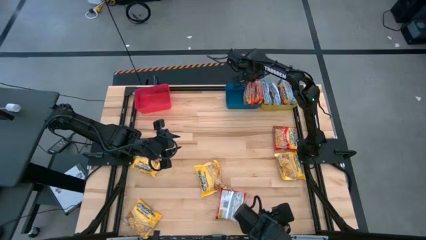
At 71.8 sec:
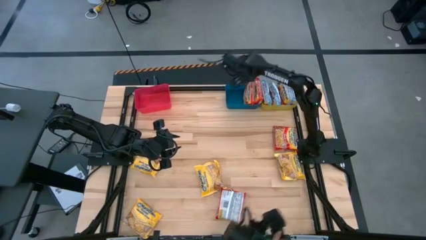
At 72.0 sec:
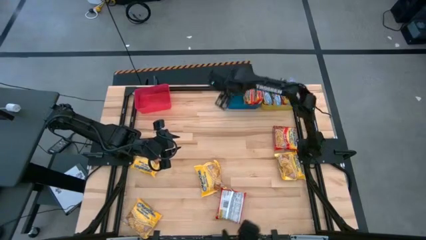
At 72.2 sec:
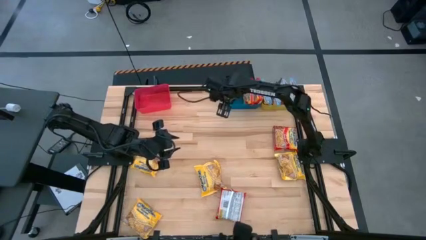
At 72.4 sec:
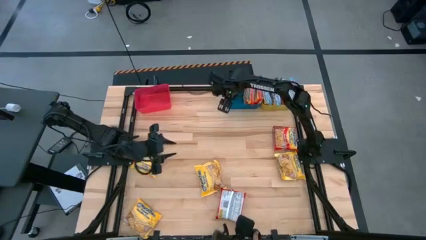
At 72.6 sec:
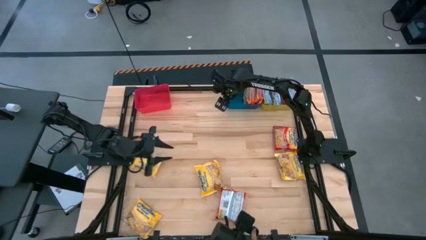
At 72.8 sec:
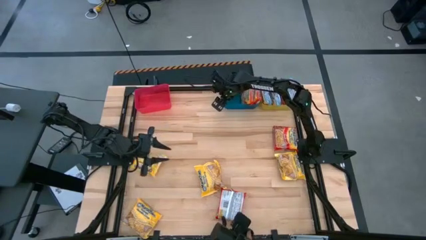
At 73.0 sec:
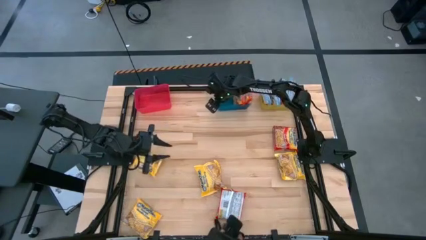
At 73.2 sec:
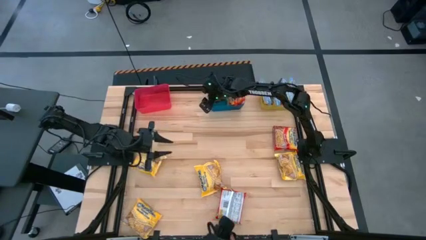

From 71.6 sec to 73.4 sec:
Task: Sort Maruchan noodles
Adjust the blue bin

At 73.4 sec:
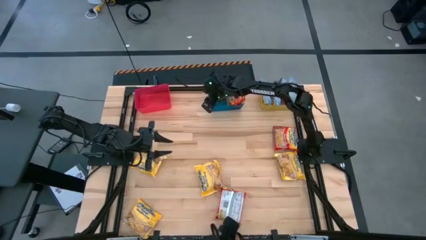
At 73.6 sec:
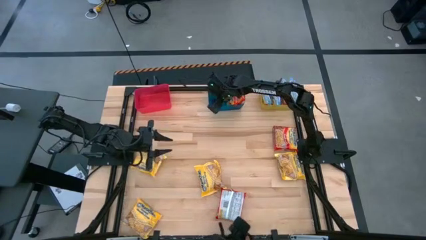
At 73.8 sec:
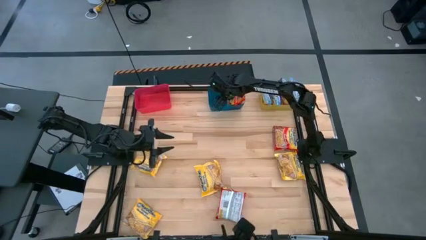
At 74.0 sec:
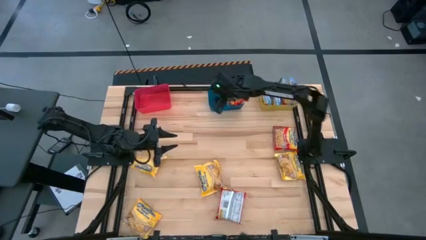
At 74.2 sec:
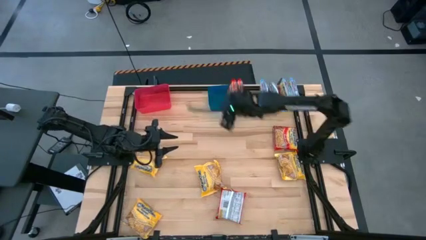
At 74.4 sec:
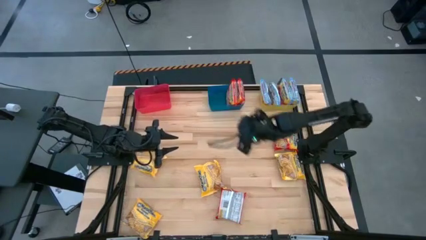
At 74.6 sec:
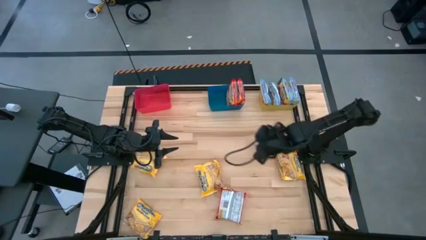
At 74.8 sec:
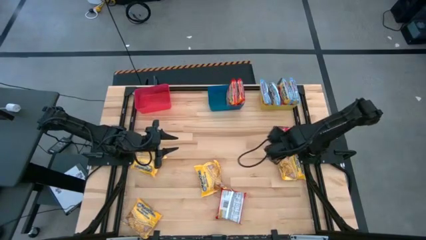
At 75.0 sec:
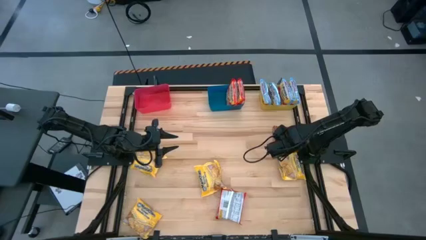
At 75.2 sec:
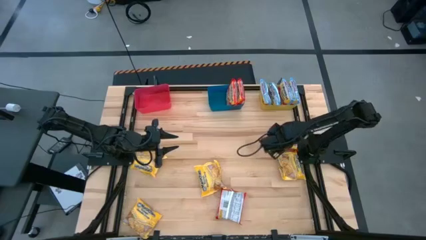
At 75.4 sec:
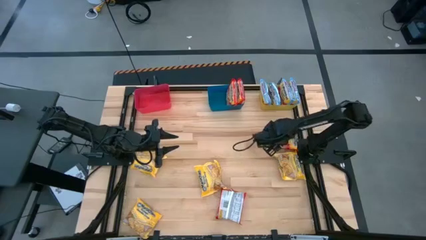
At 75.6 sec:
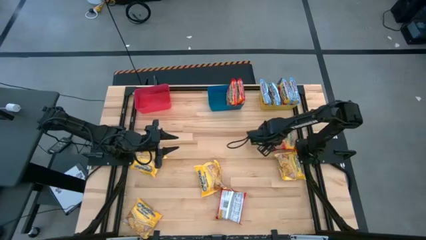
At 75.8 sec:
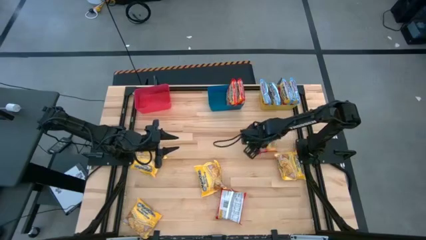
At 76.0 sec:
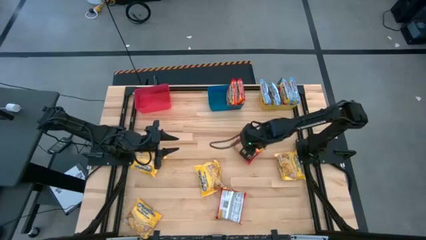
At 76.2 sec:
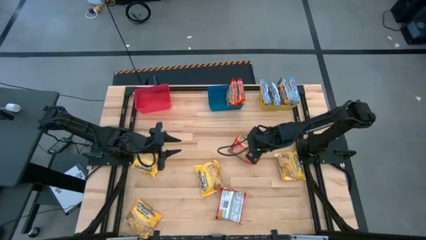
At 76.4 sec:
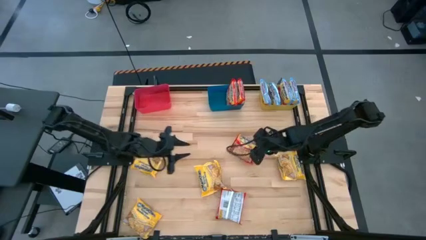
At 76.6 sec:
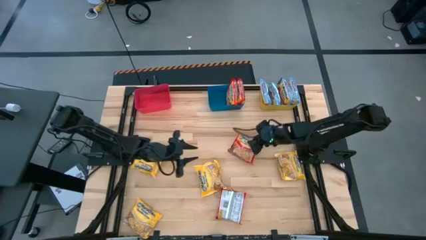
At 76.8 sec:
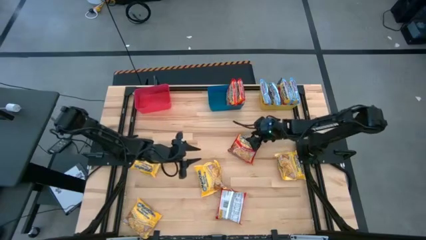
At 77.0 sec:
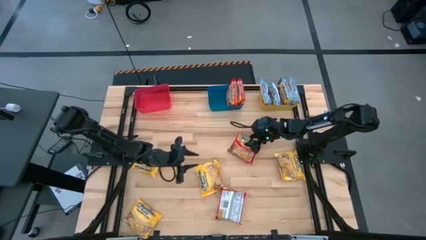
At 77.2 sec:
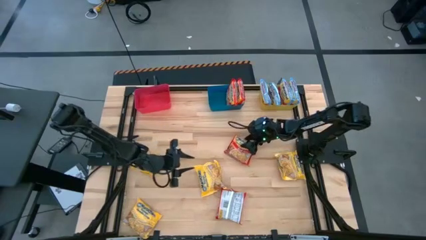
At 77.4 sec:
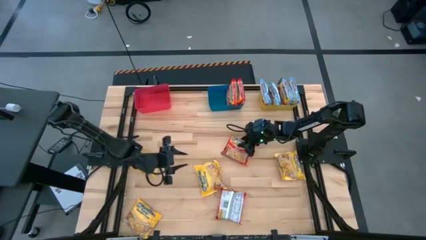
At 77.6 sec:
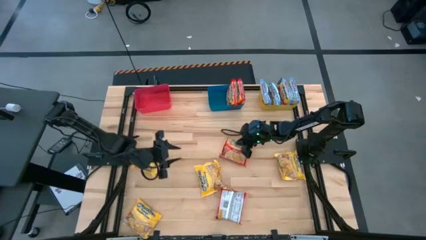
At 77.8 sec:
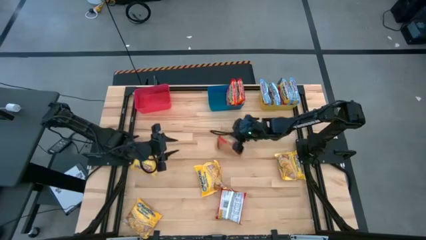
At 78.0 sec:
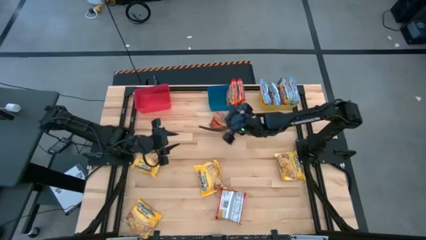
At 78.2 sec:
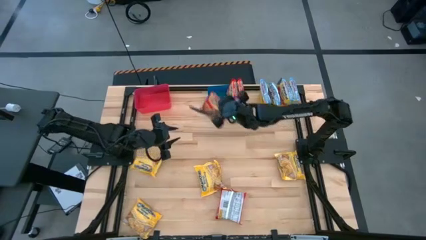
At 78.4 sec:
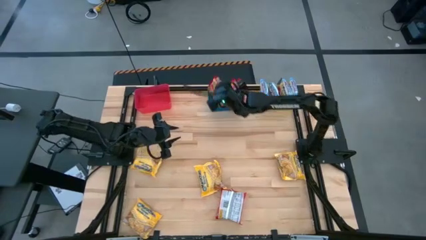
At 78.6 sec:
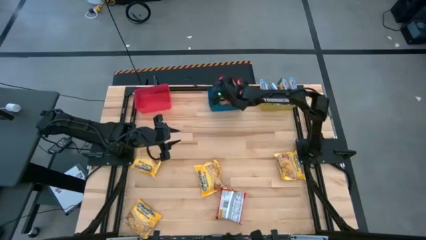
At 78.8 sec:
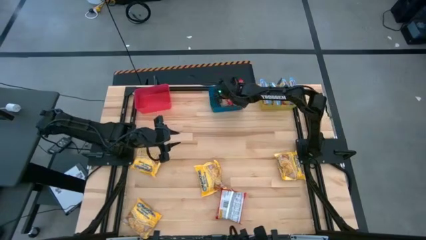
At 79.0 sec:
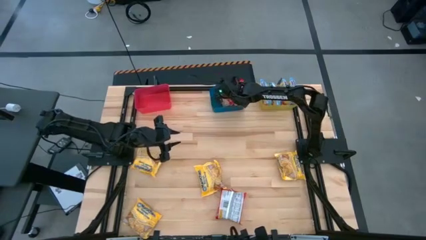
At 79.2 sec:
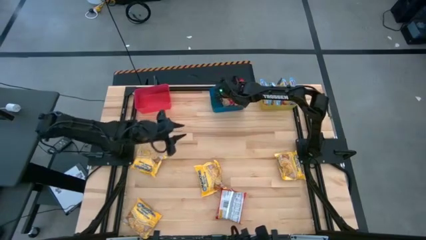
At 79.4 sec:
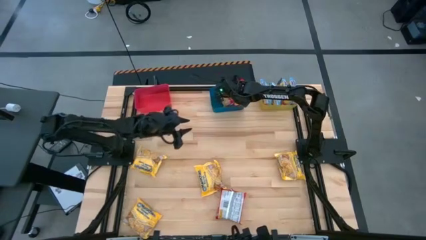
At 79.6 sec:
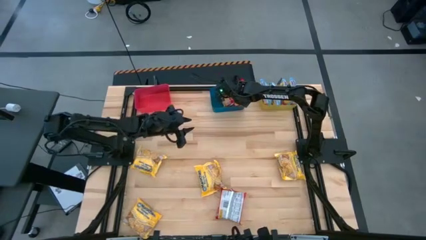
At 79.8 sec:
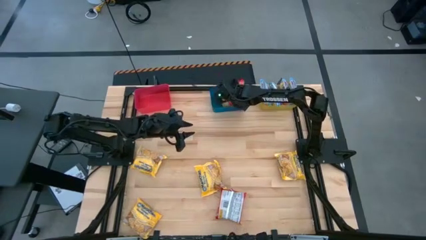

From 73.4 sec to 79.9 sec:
Put the red noodle pack into the blue bin

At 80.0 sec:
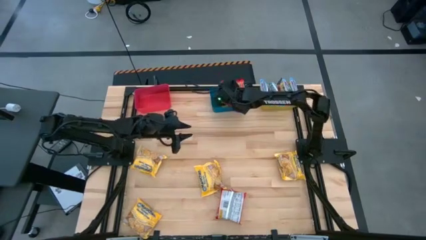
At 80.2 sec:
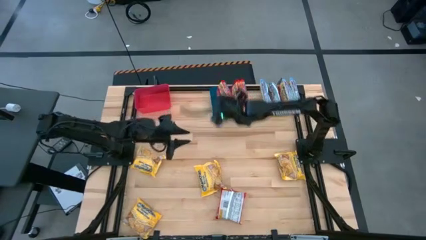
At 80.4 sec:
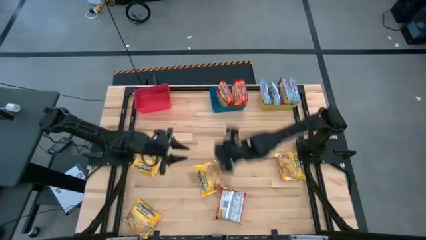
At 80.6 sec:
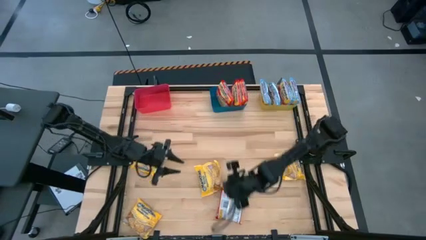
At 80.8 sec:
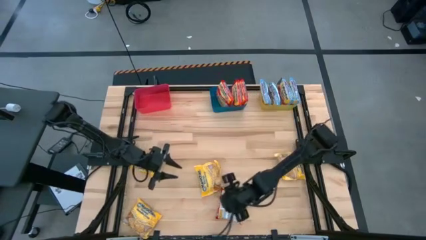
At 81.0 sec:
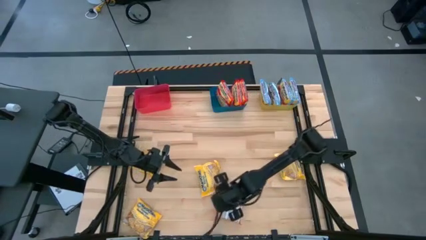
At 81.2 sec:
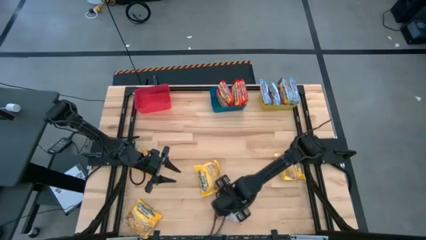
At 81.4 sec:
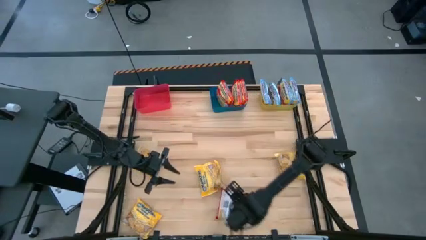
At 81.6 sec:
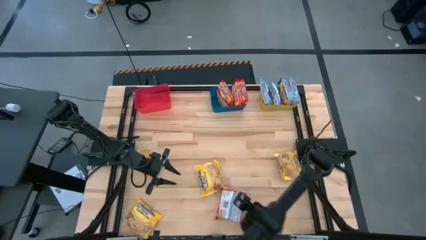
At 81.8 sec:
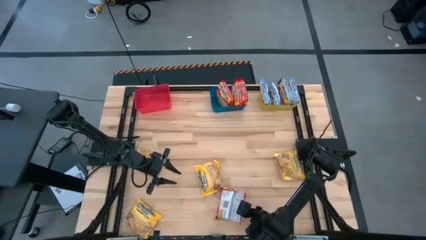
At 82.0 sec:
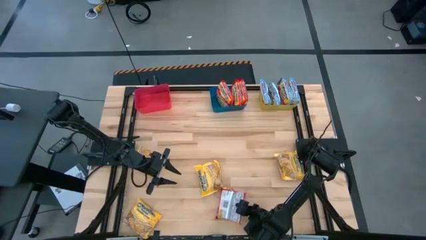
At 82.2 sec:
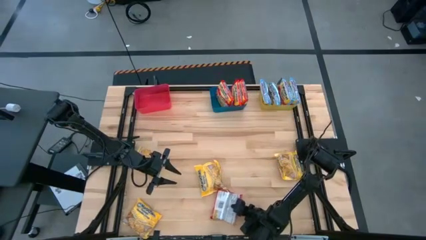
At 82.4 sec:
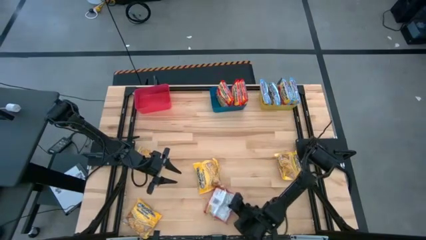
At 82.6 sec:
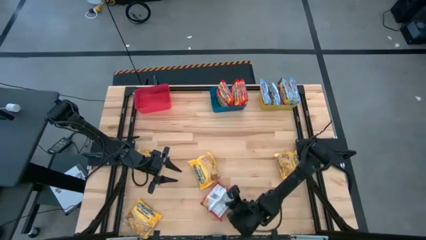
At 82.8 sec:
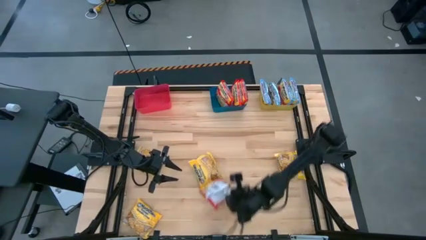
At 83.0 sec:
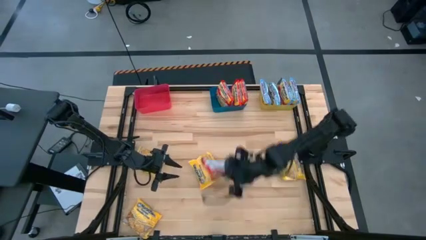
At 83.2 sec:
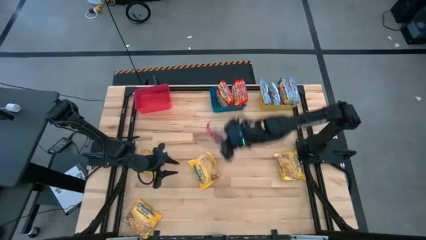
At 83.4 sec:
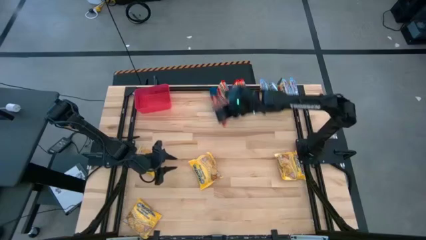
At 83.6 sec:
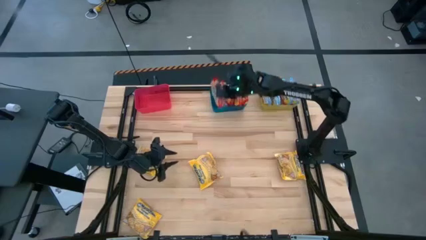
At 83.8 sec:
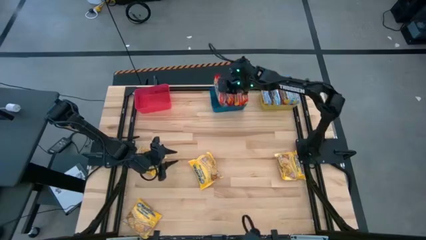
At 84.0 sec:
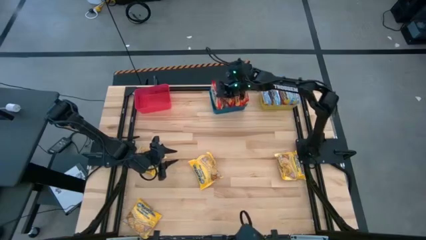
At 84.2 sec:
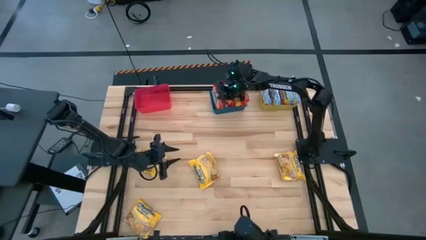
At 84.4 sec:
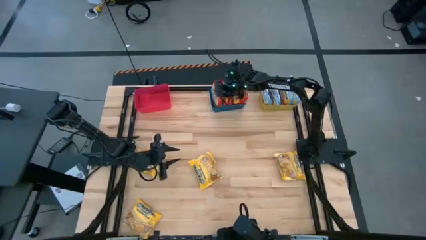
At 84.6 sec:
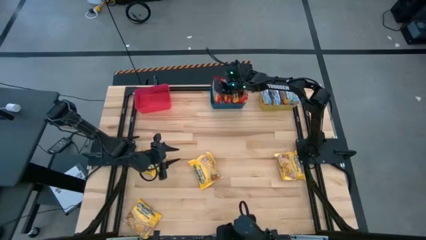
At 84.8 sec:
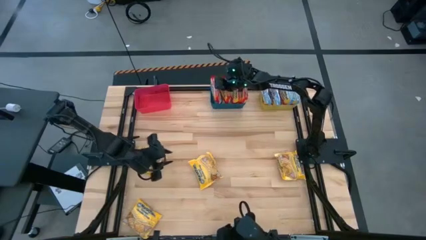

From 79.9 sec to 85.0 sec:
Put the red noodle pack into the blue bin

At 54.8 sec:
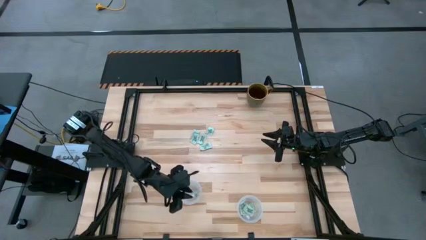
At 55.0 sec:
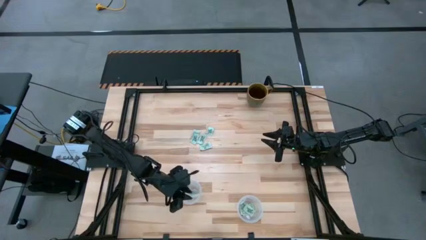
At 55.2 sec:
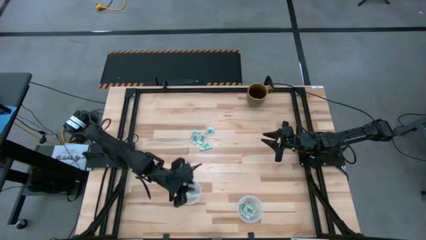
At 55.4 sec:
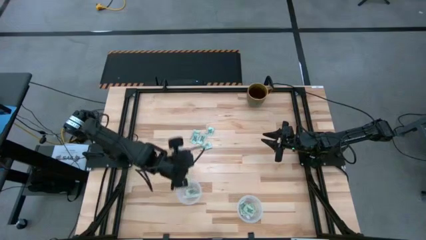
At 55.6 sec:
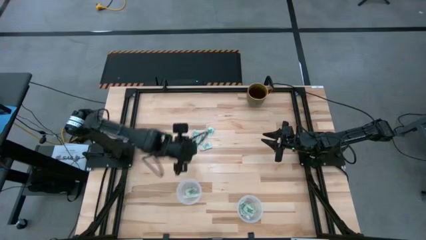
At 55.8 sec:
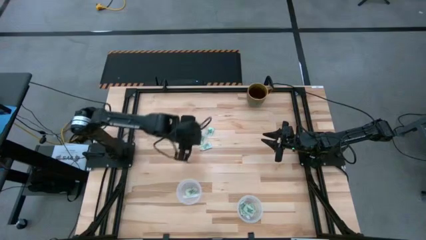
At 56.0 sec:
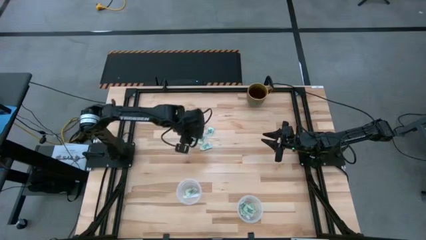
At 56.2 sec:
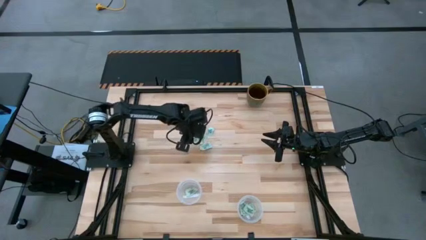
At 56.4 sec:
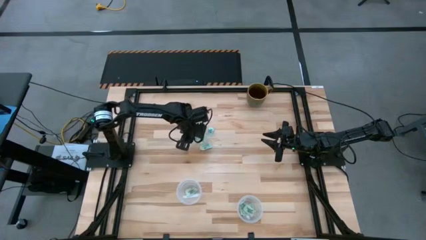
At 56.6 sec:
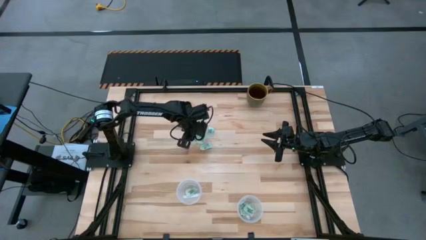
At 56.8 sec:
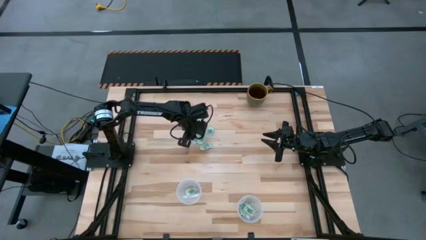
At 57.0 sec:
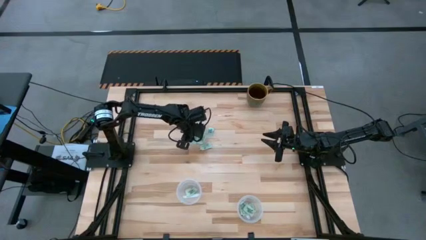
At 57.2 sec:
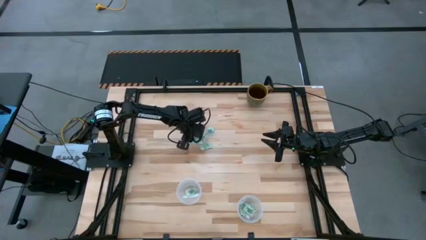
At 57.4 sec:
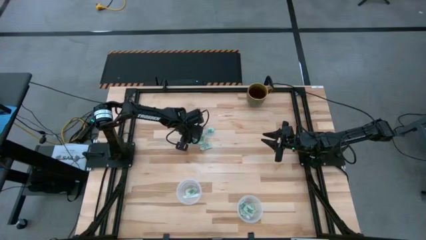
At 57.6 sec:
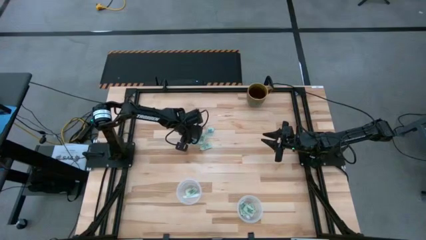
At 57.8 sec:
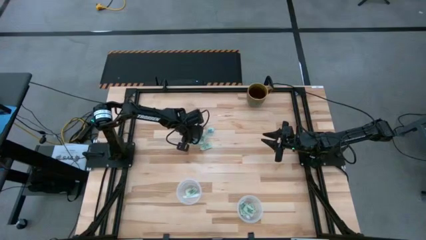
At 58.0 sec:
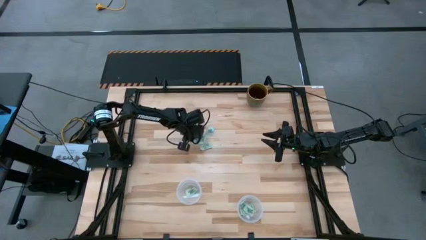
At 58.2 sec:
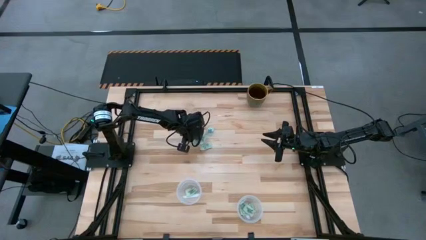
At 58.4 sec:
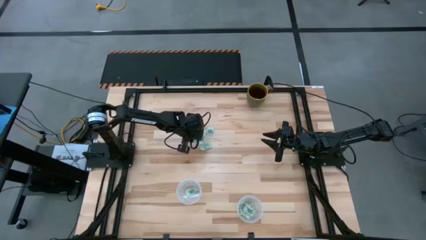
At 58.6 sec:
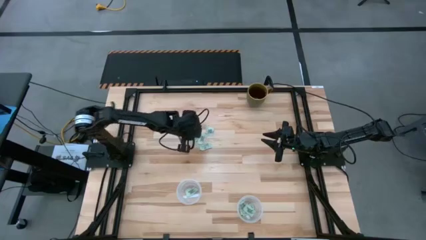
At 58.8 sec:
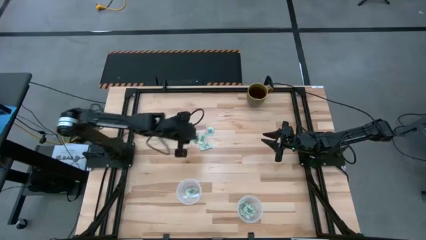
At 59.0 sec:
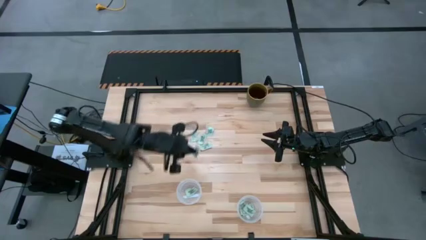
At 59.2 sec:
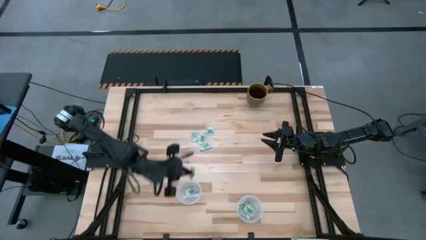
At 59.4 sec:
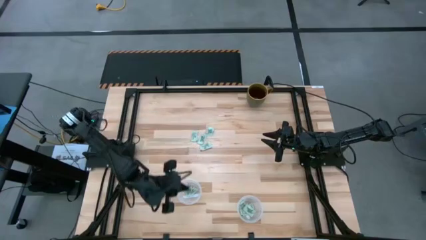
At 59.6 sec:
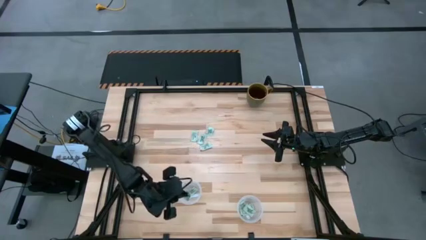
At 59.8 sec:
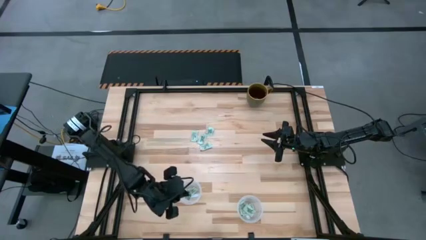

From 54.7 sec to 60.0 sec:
Task: Pick and place items into bin
Put the stevia packet into the left transparent bin
